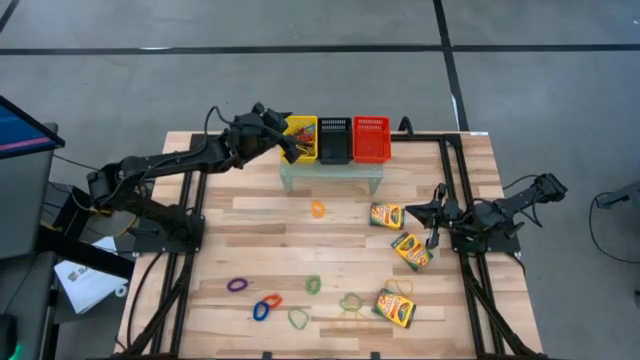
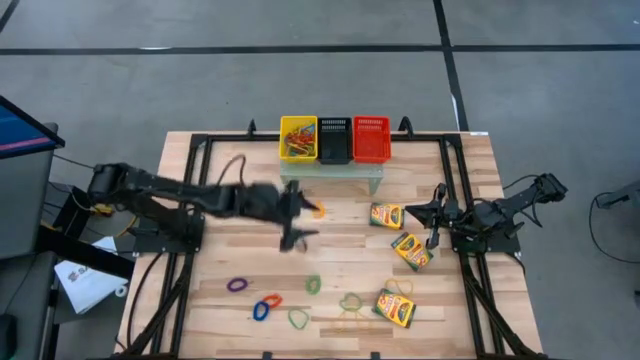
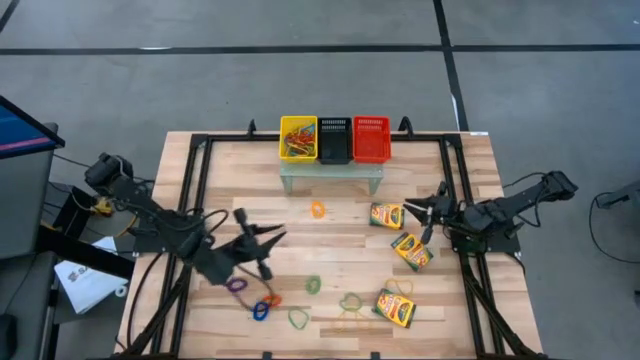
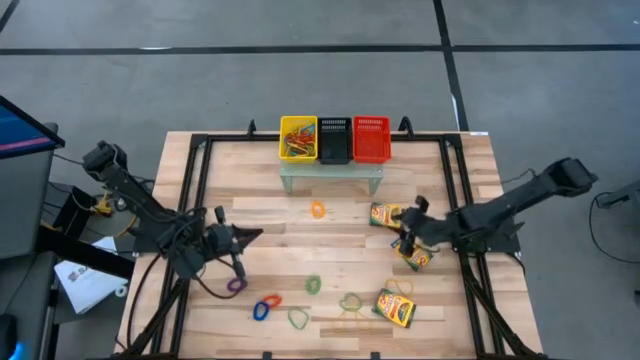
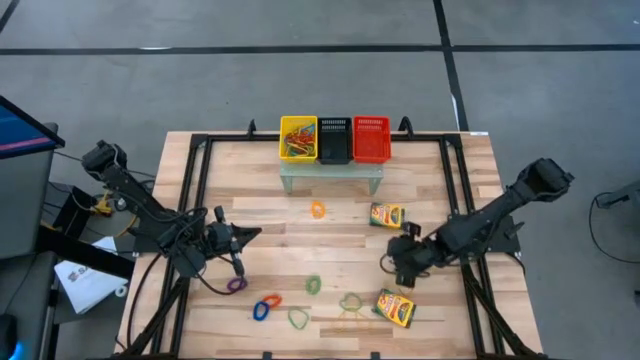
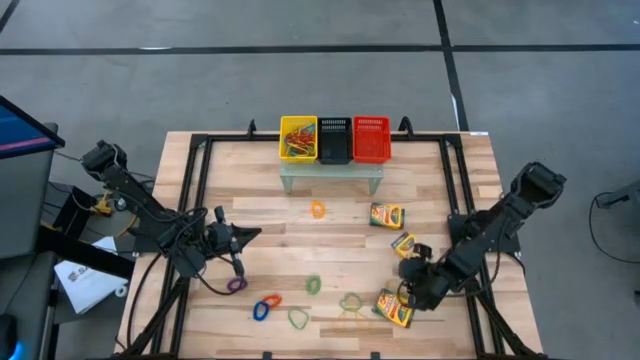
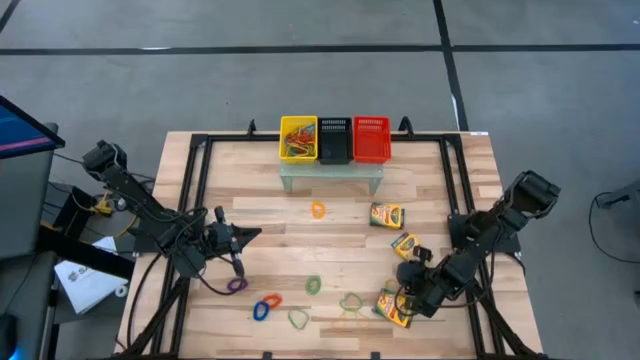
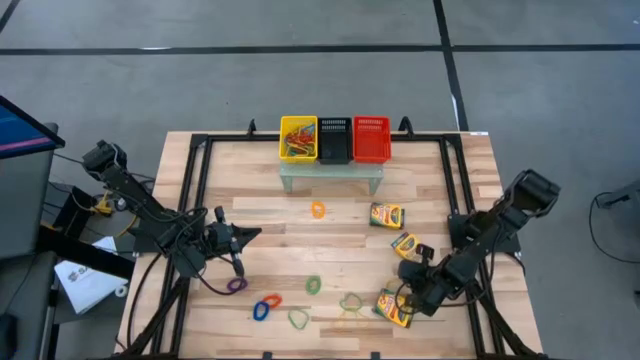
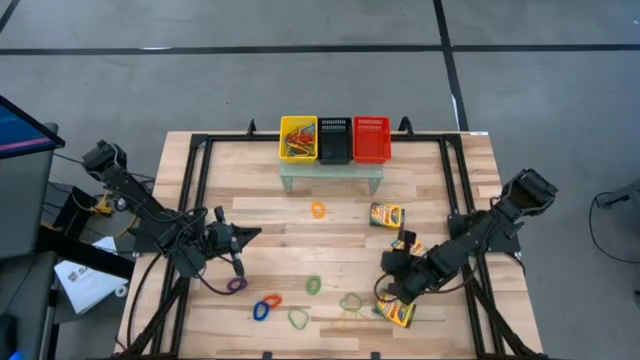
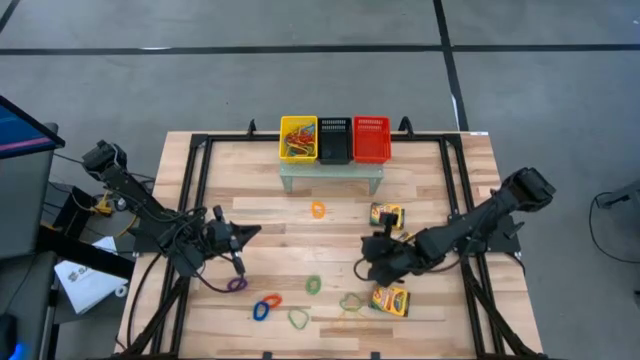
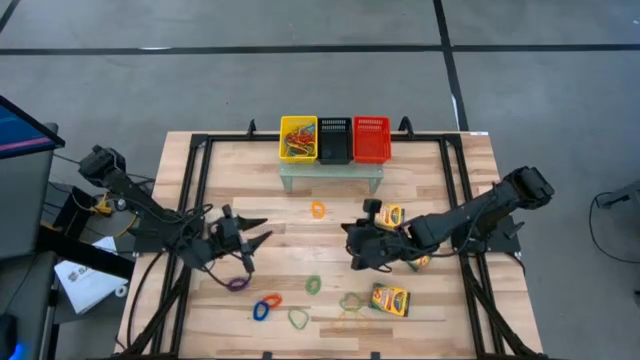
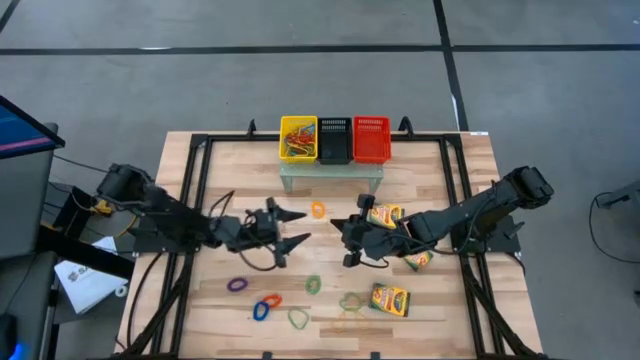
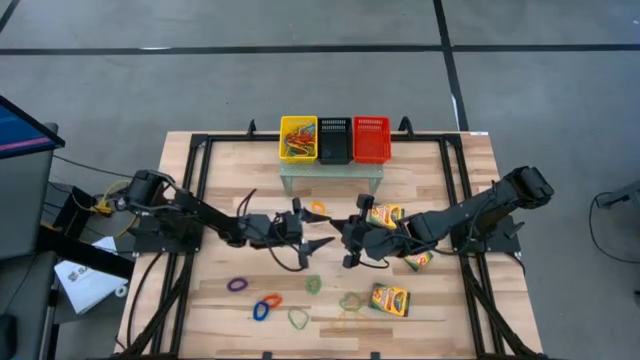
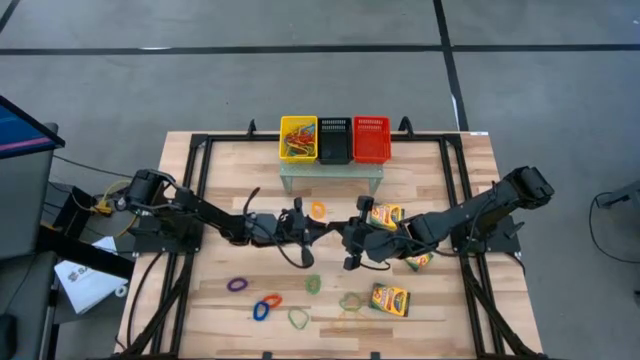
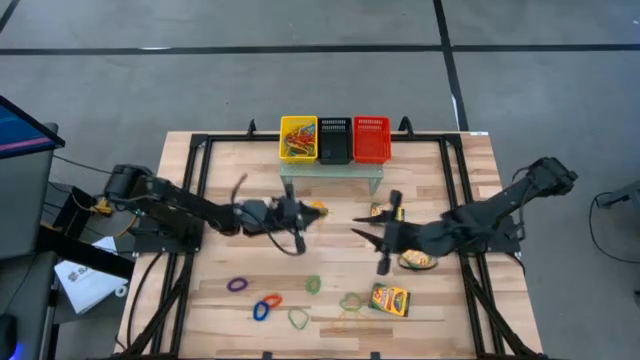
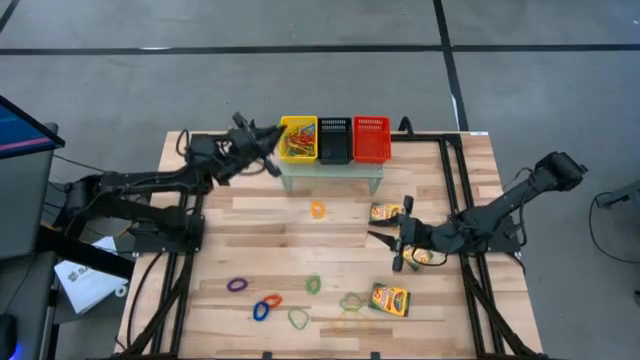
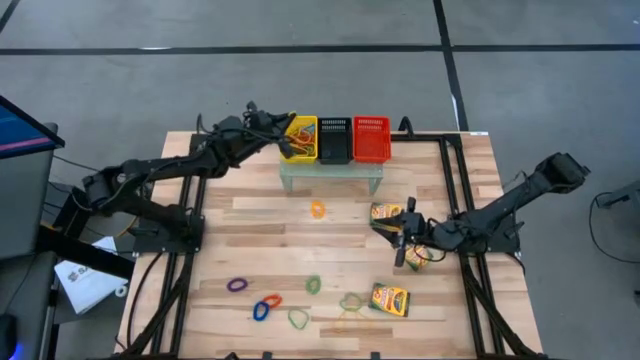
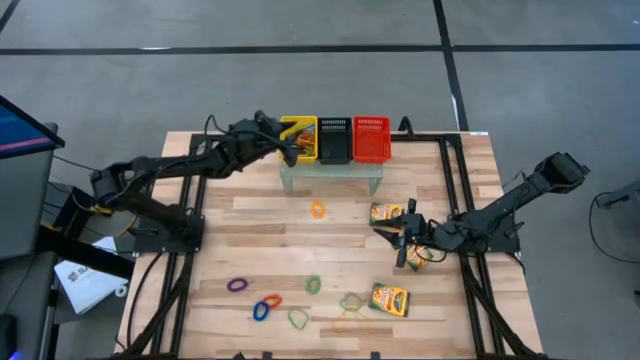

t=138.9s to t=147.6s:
Task: Pick & Place Office Desk Supplies
Put the top right big yellow rubber band into the yellow bin on the shelf

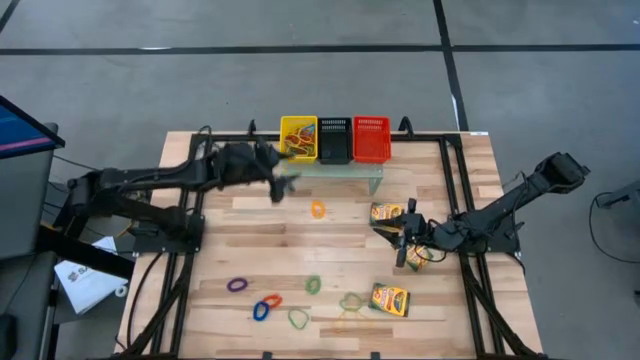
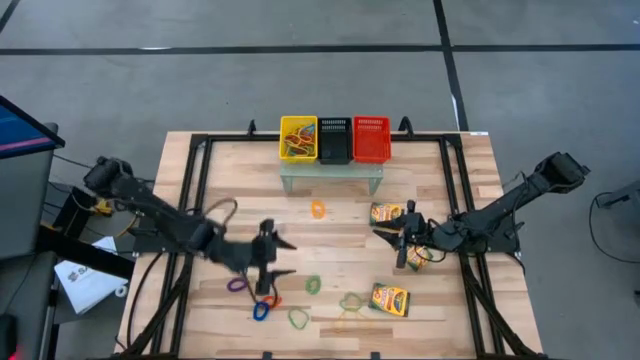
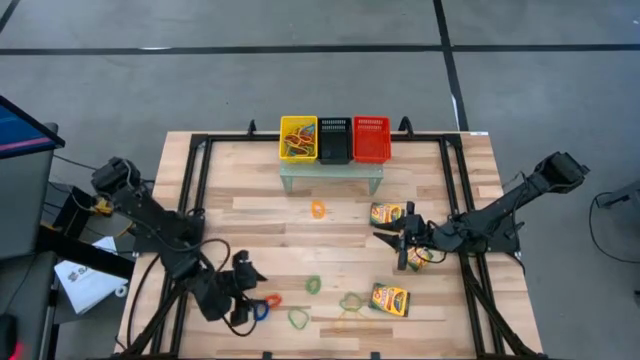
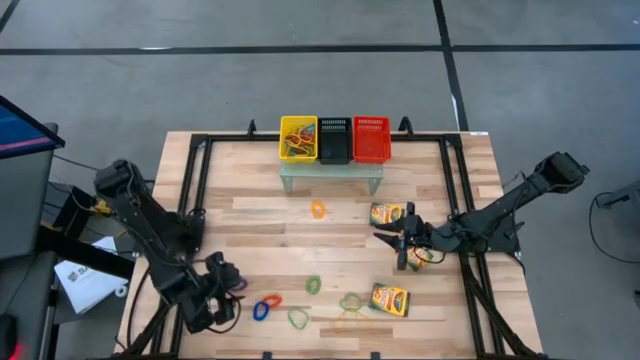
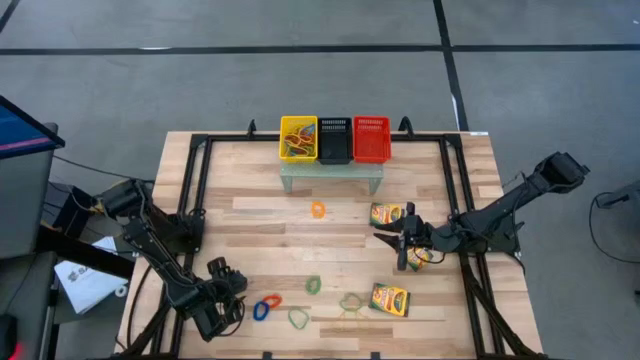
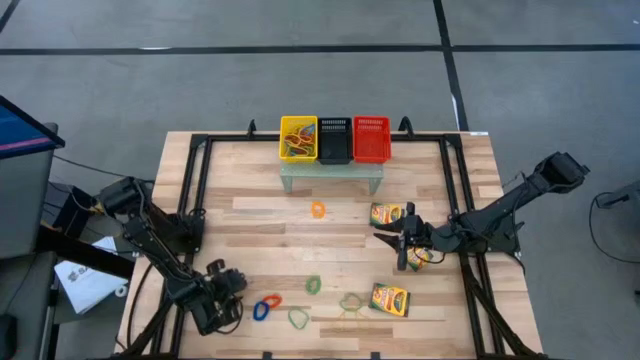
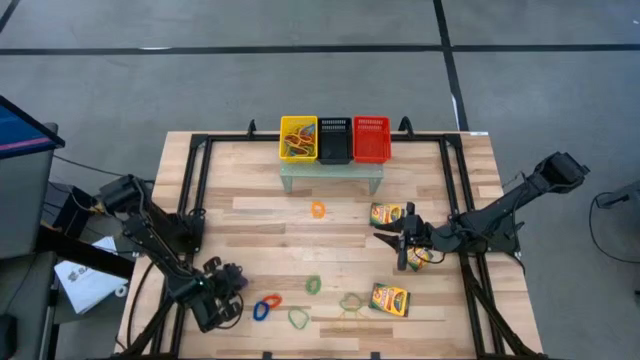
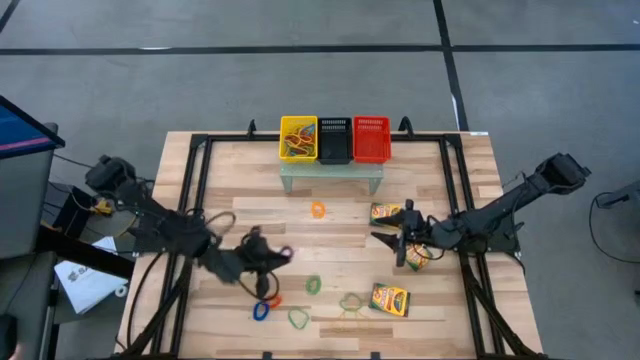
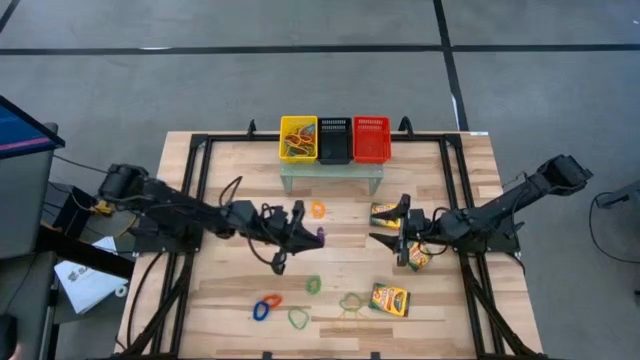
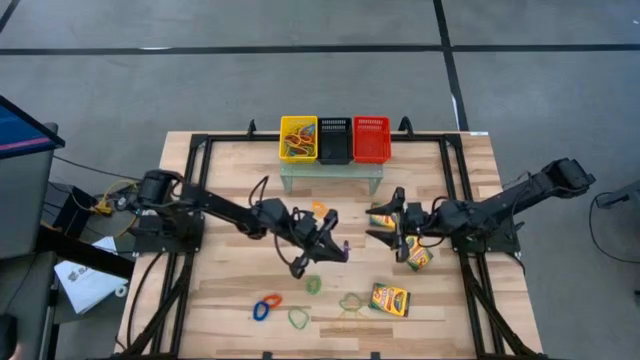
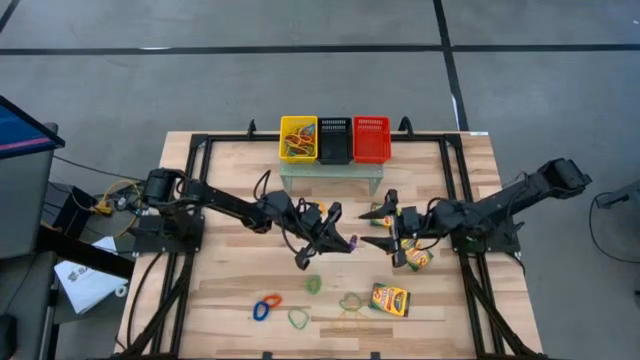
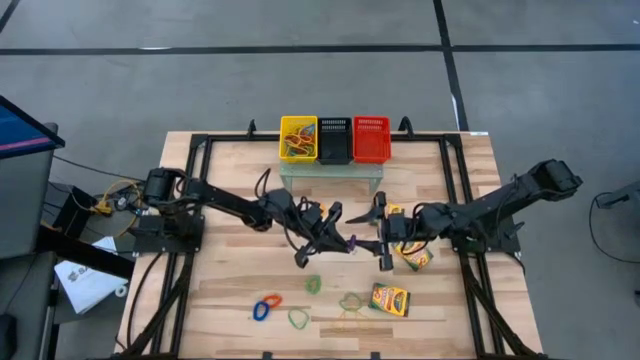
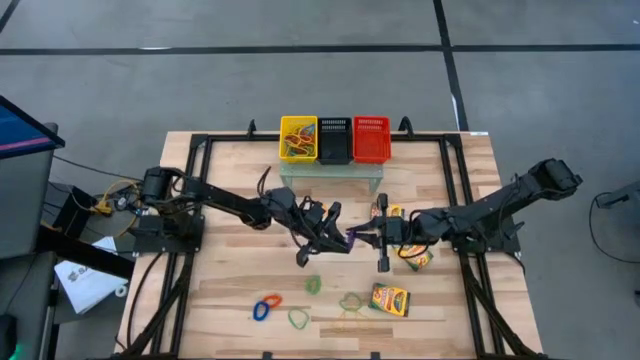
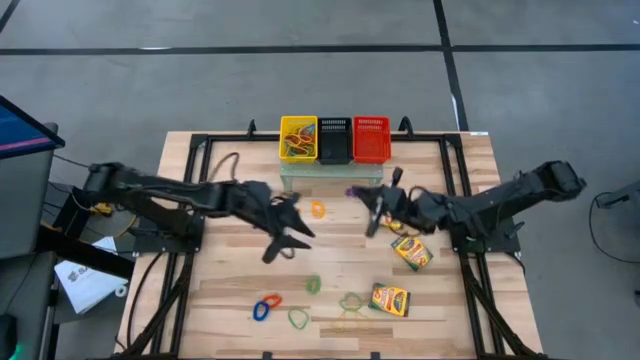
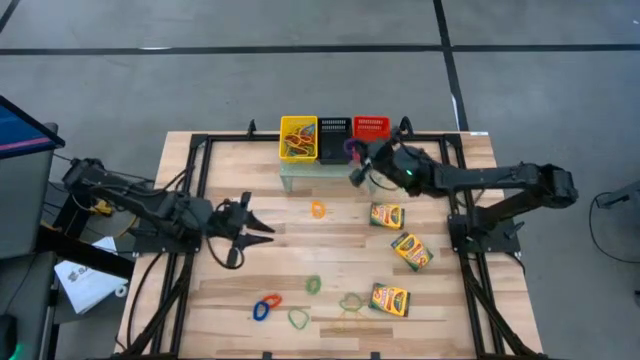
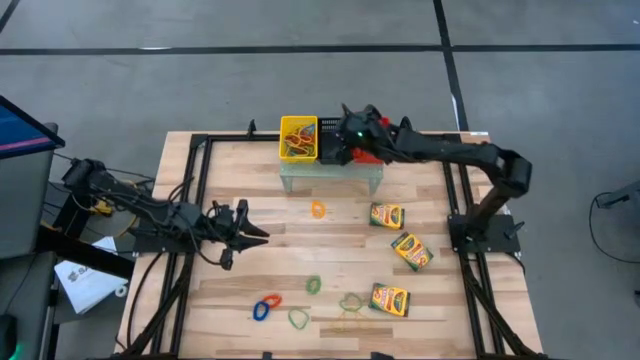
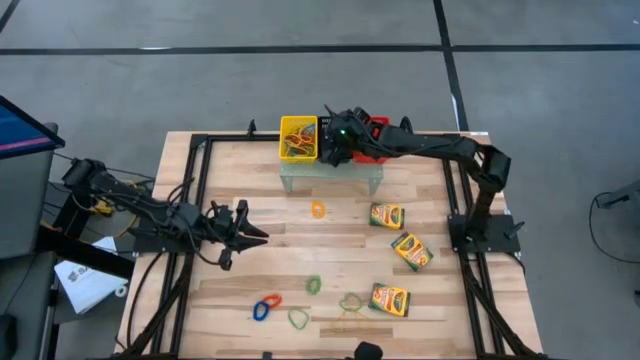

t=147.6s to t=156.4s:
Put the purple spring keychain into the black bin on the shelf

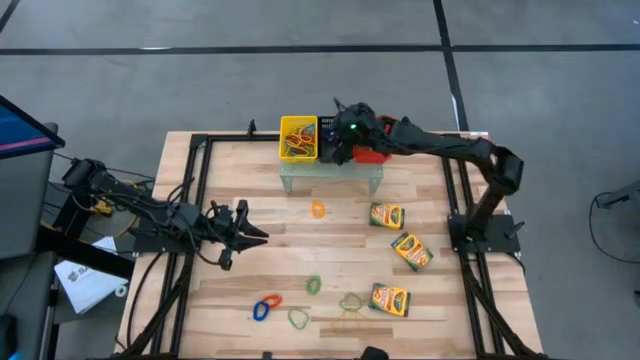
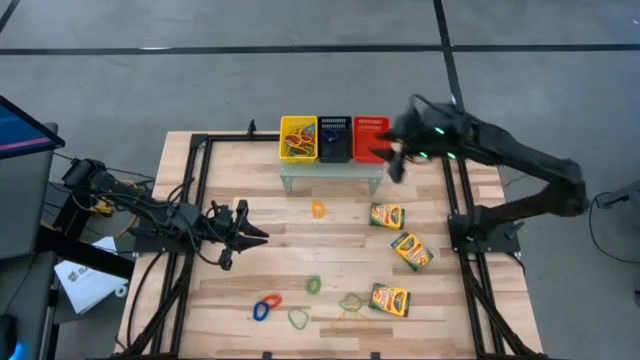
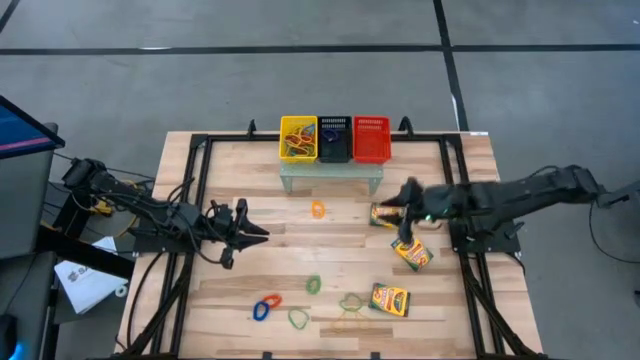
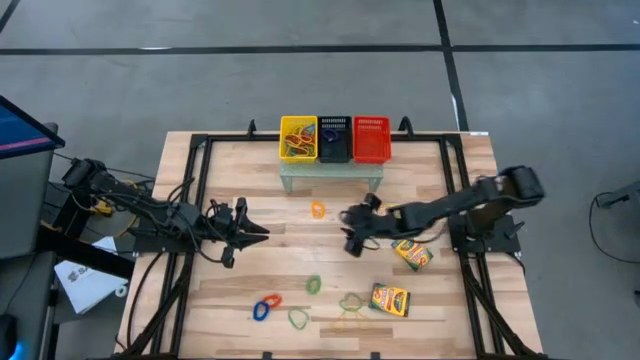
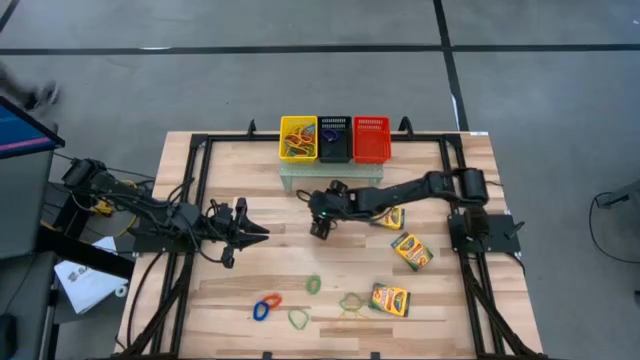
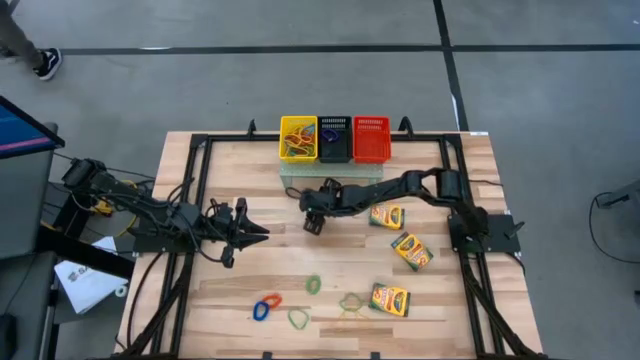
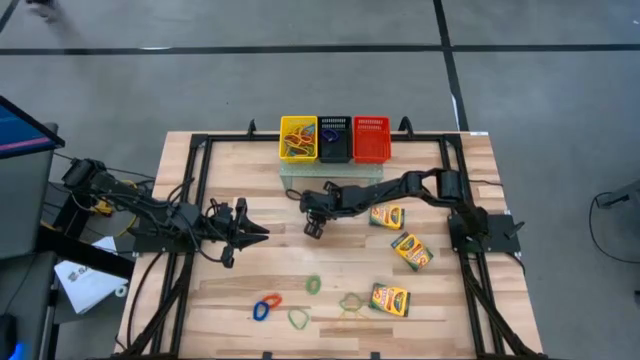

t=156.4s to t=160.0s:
Put the yellow spring keychain into the black bin on the shelf
